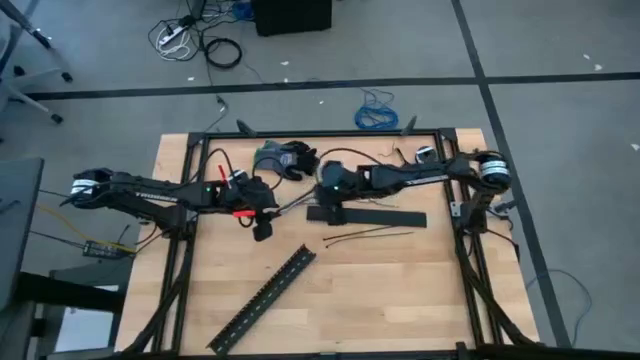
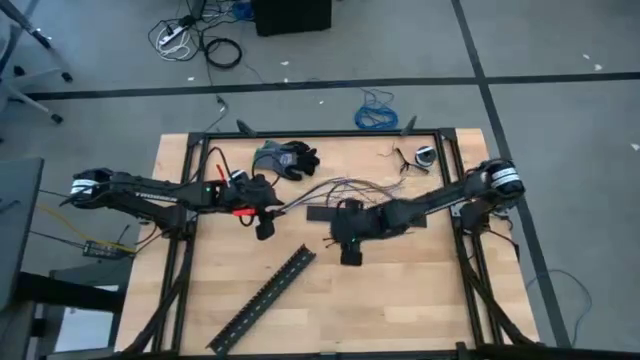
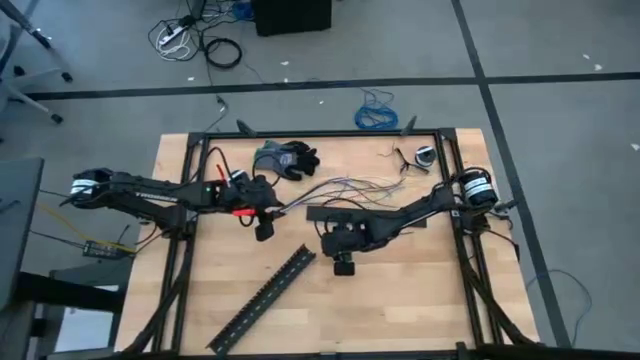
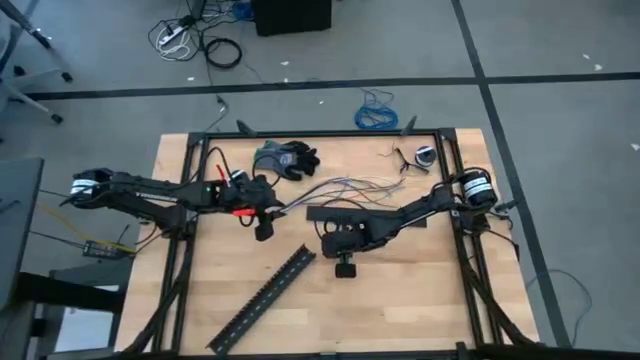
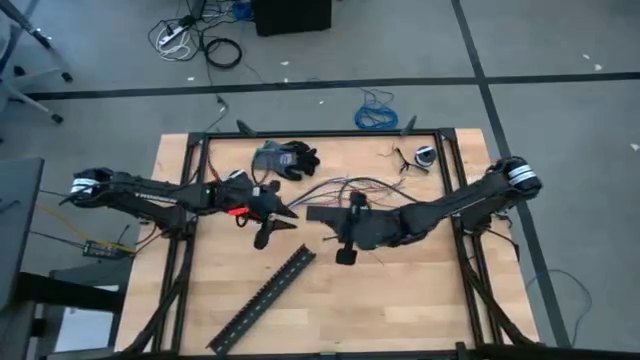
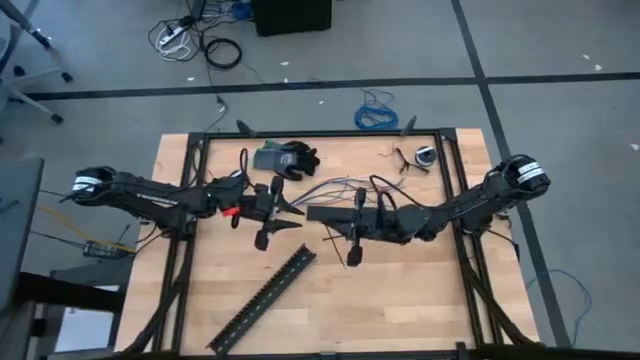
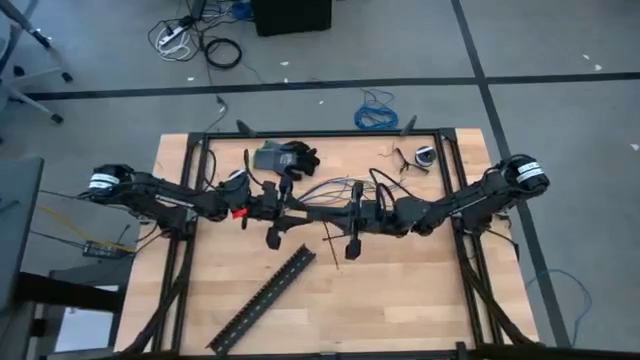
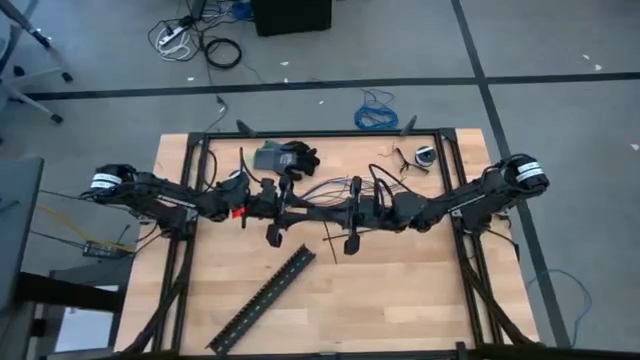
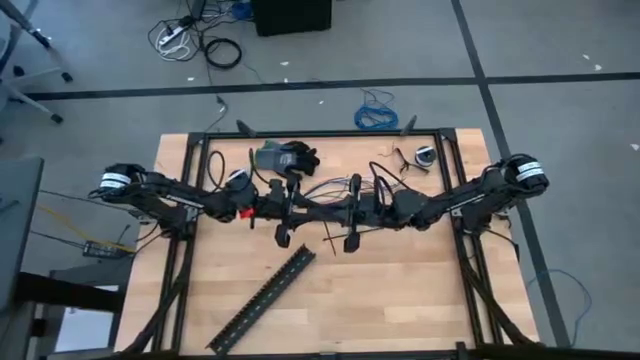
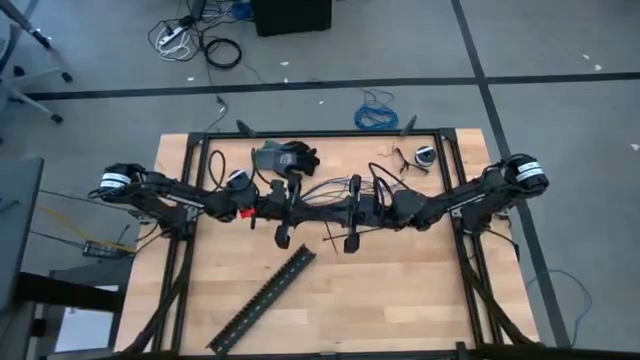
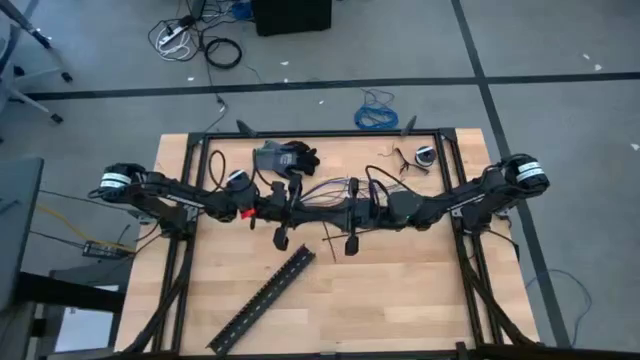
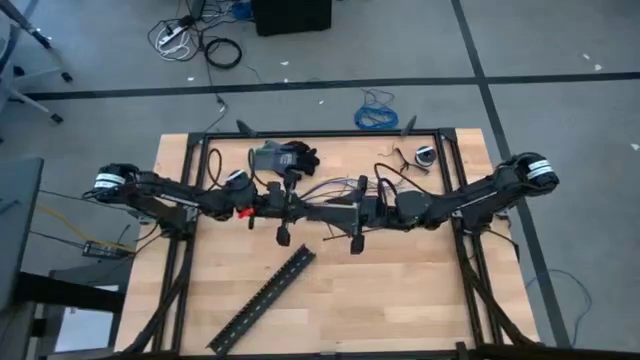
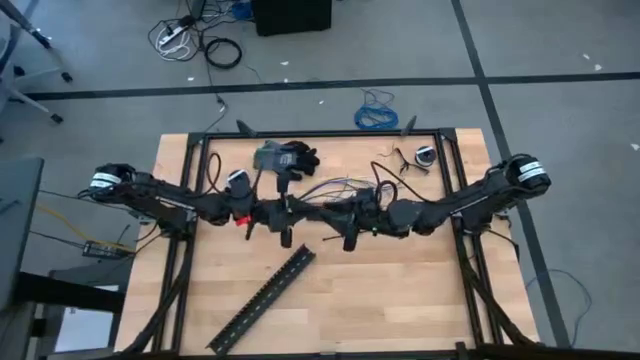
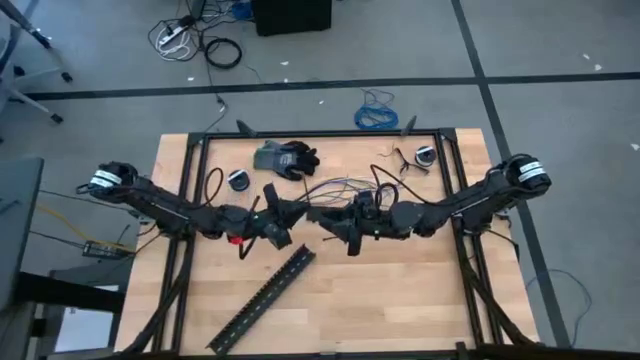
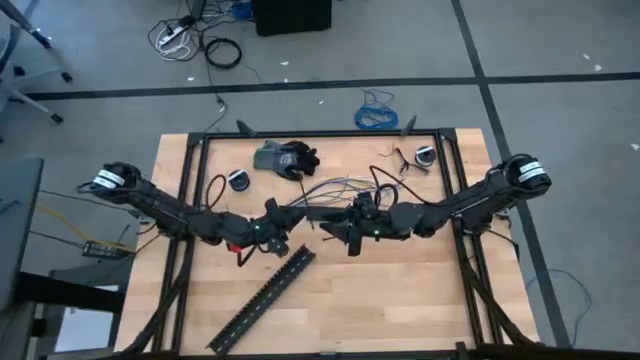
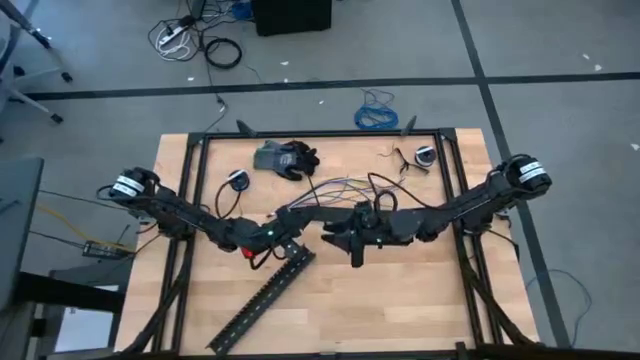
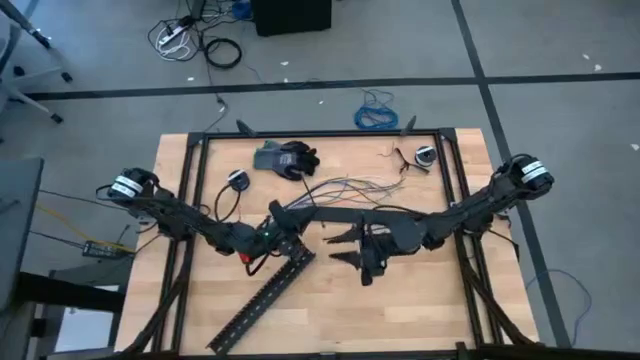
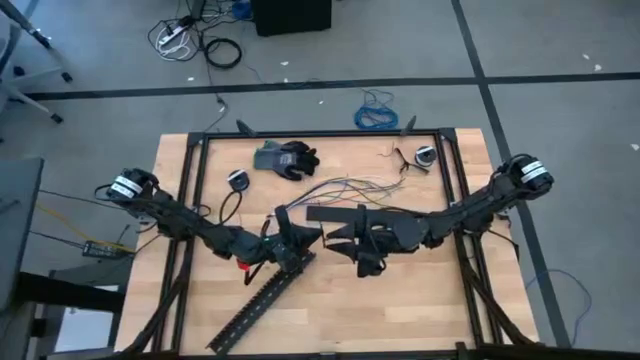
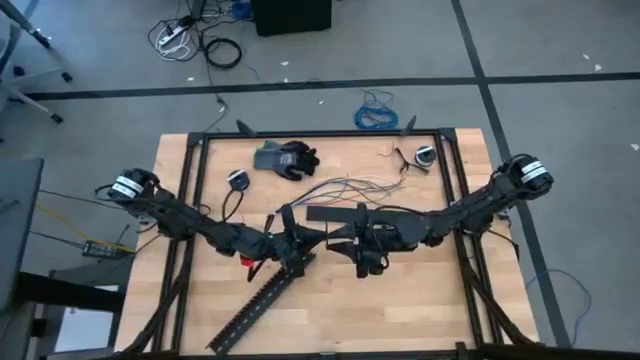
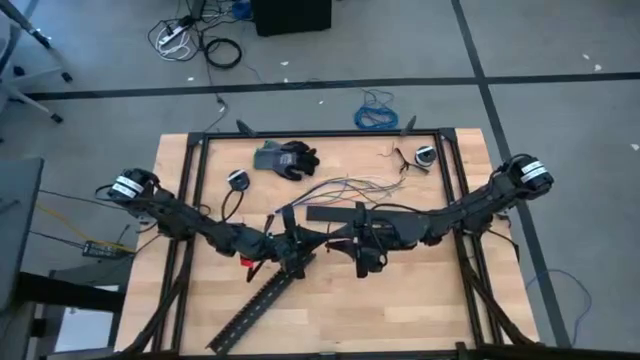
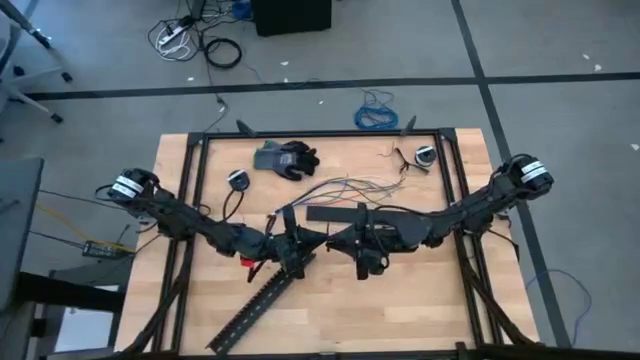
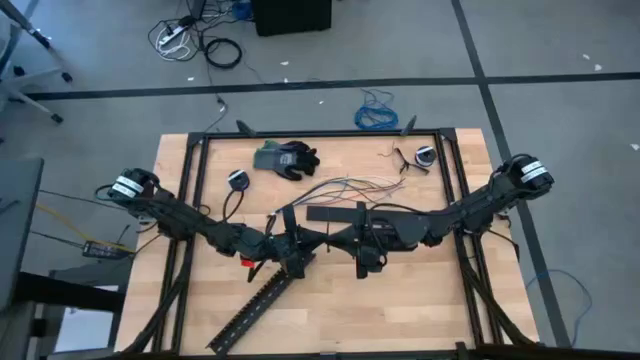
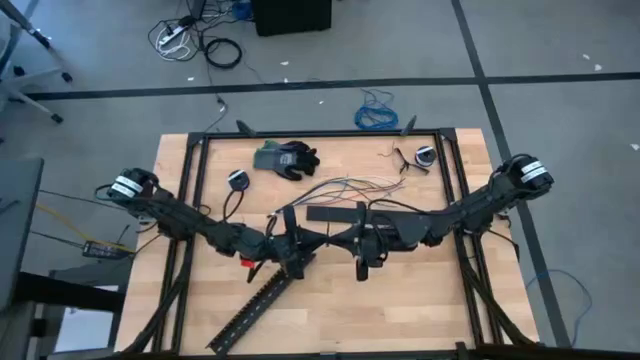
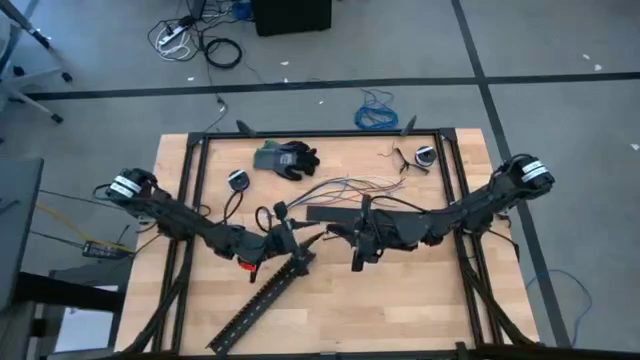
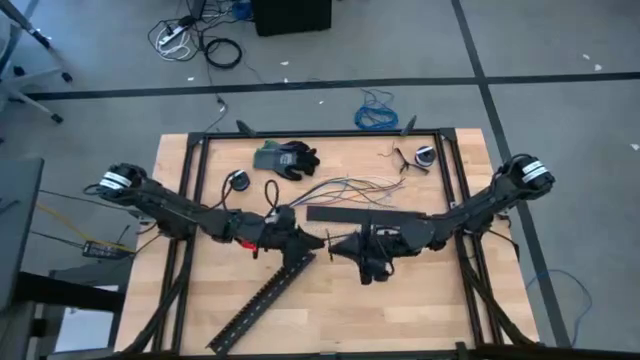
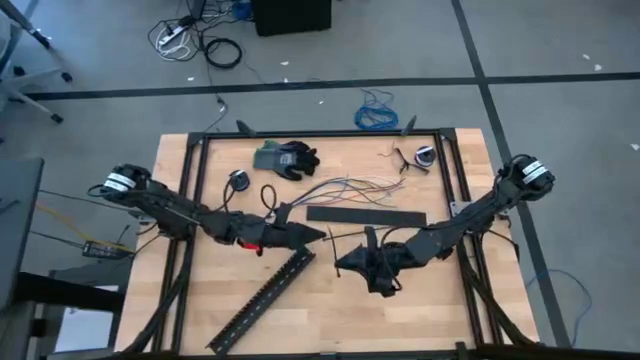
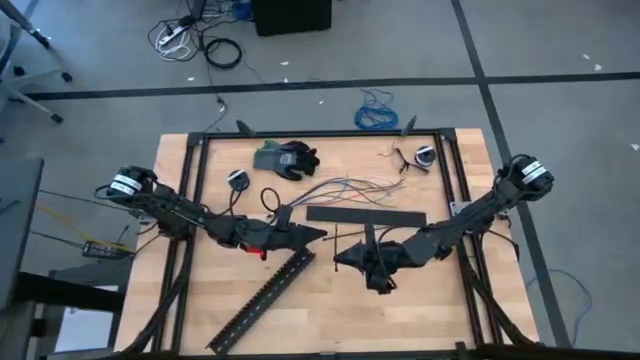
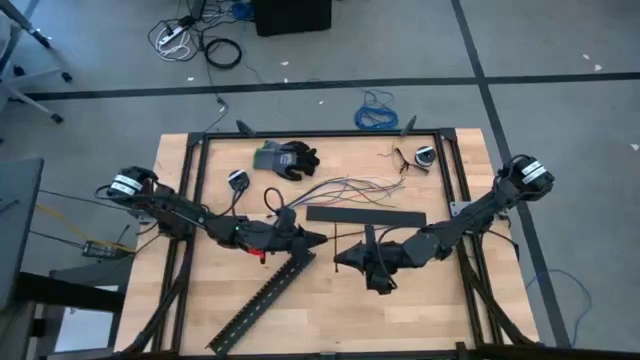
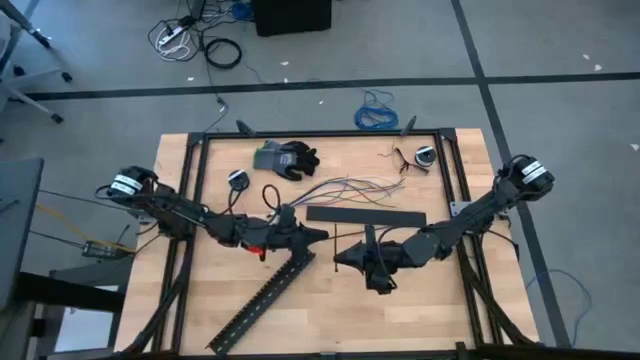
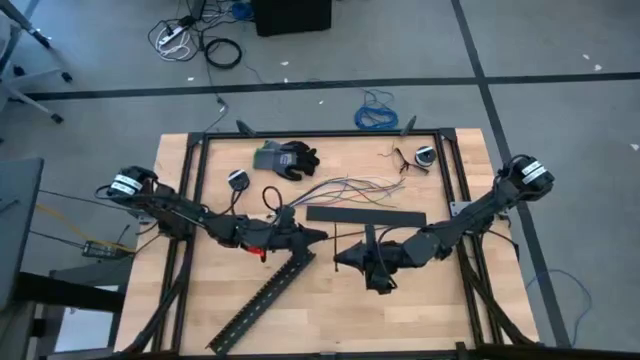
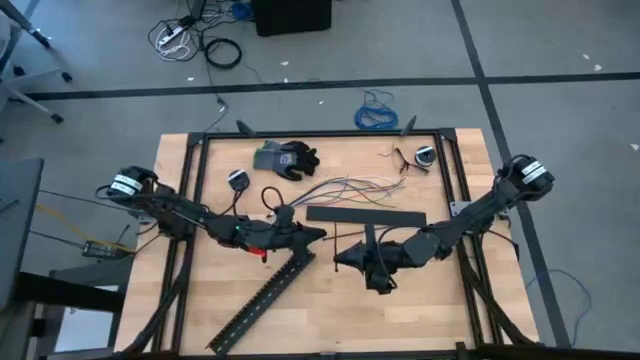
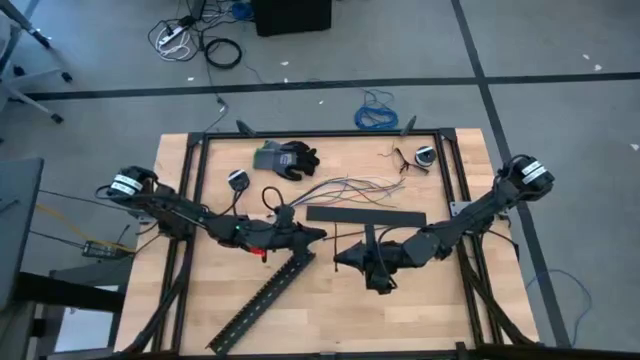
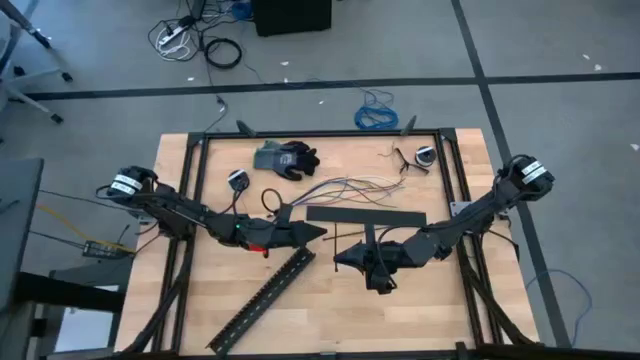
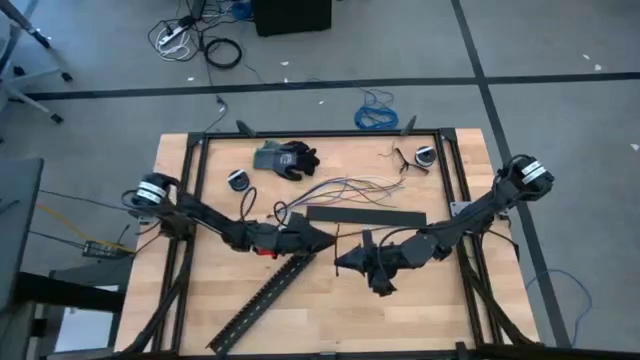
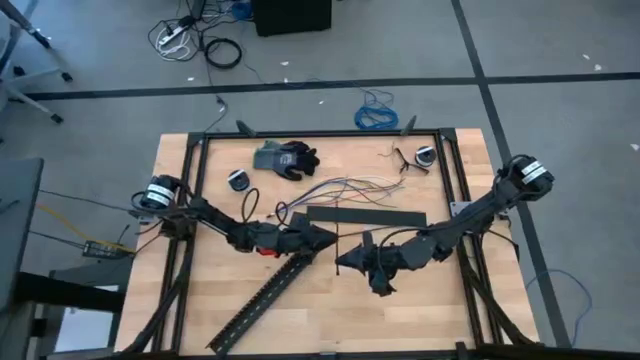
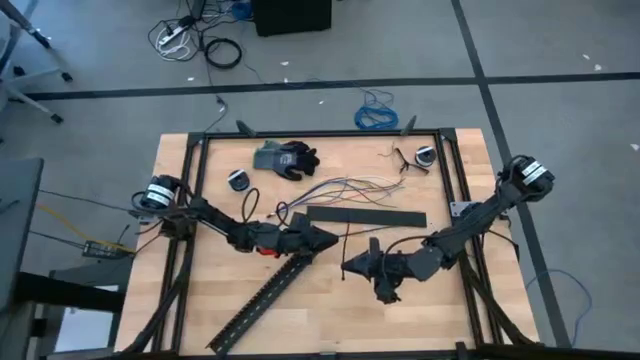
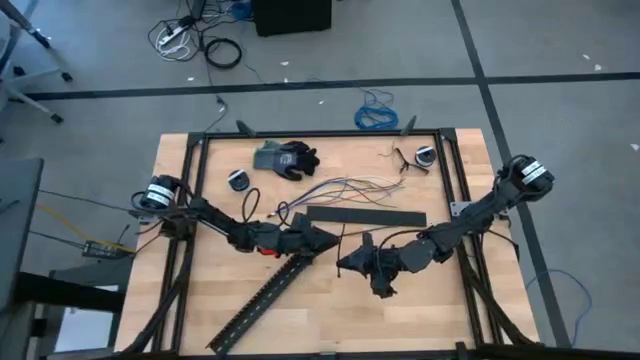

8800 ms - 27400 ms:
Task: Ziptie cables
Insert the black zip tie into the locking head

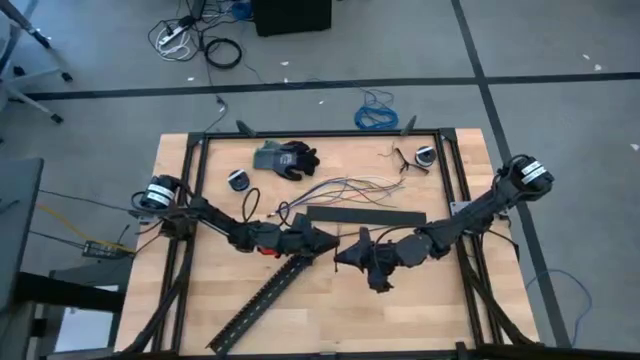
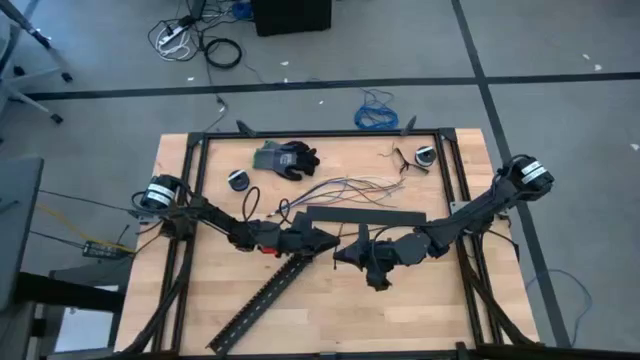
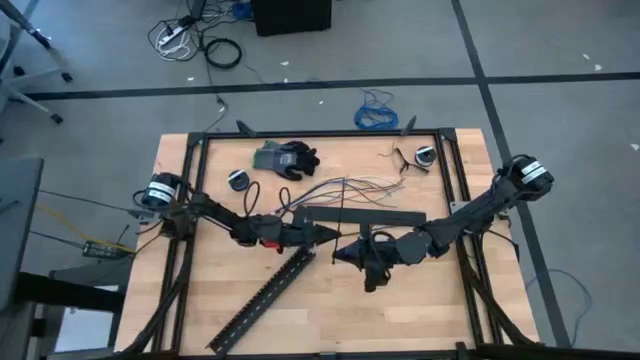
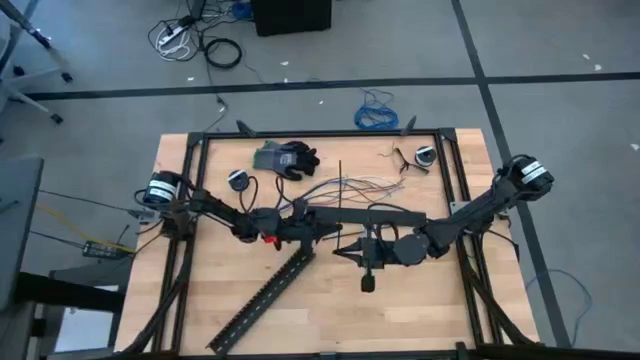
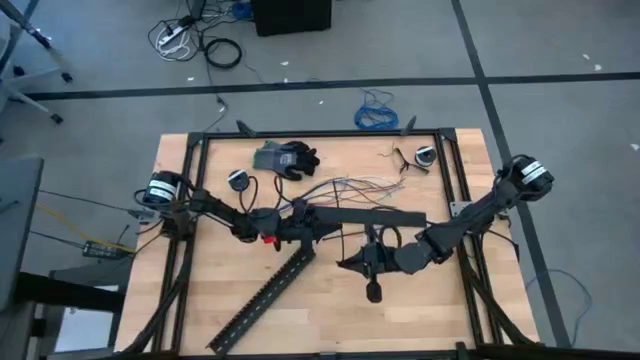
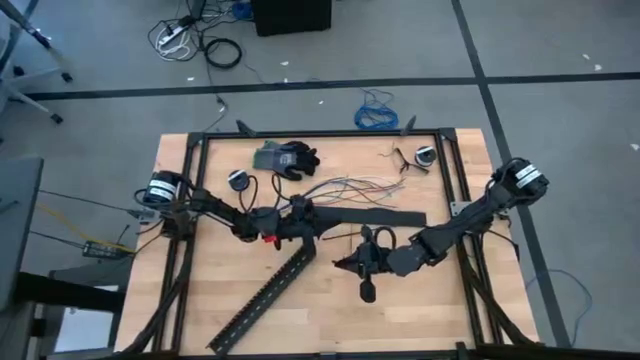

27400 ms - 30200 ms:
Insert the black zip tie into the locking head
